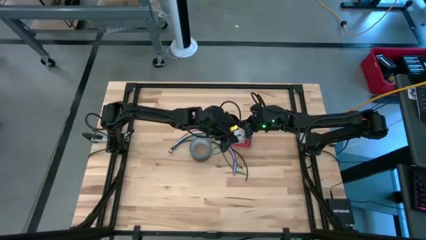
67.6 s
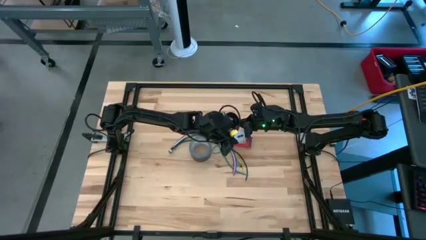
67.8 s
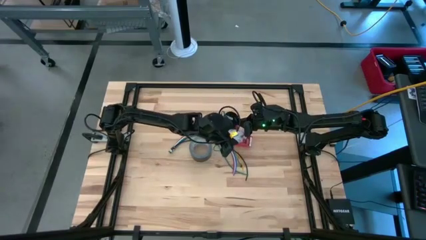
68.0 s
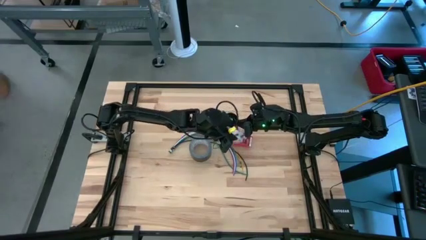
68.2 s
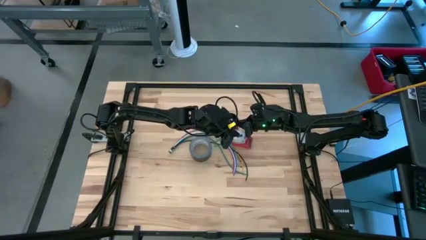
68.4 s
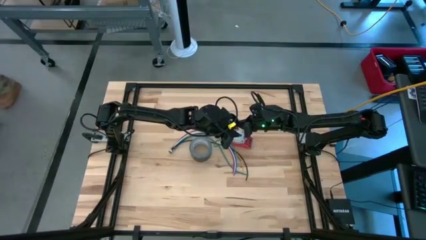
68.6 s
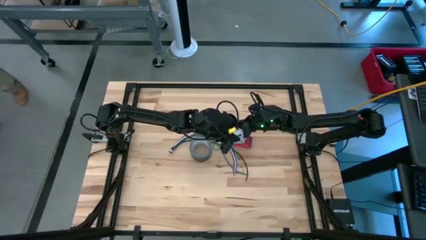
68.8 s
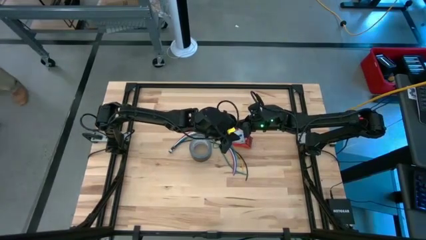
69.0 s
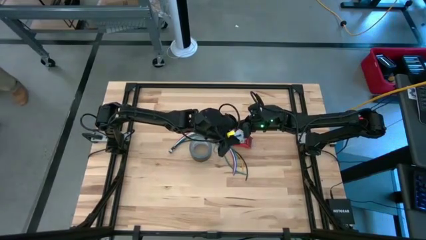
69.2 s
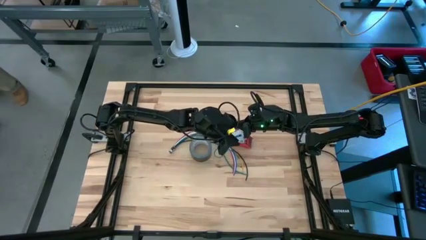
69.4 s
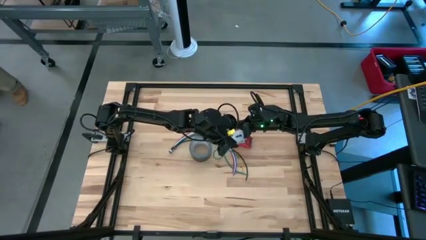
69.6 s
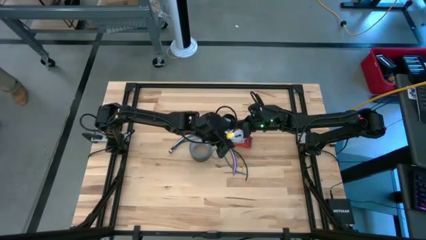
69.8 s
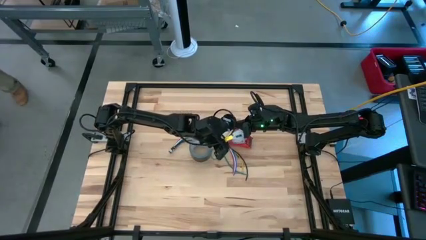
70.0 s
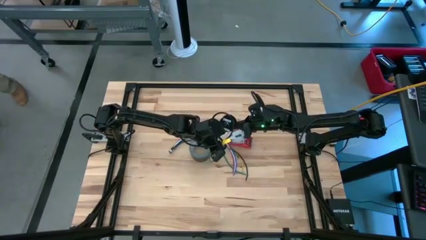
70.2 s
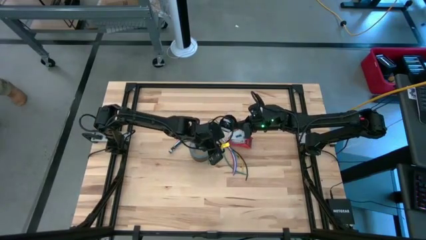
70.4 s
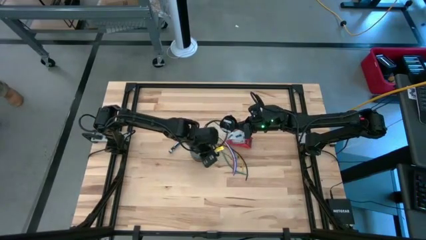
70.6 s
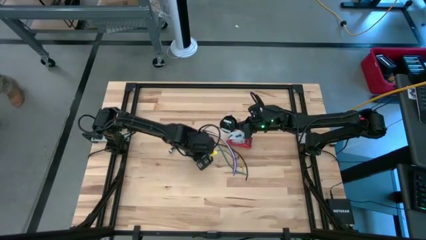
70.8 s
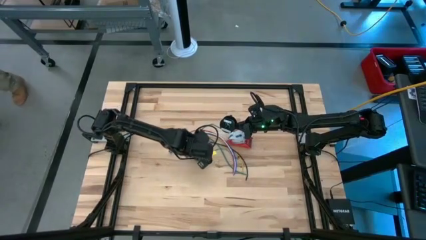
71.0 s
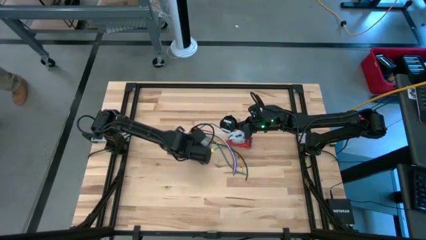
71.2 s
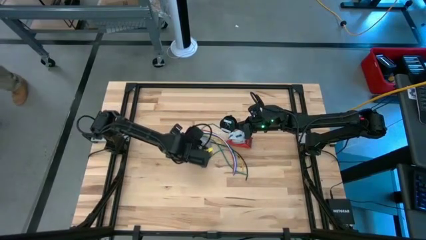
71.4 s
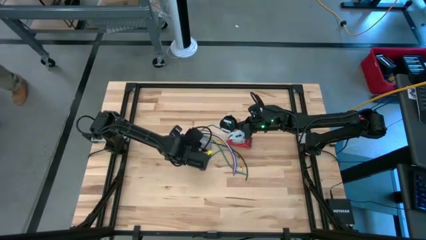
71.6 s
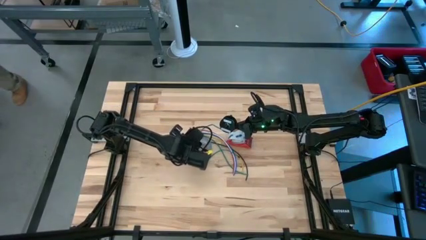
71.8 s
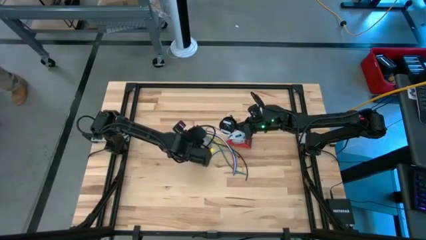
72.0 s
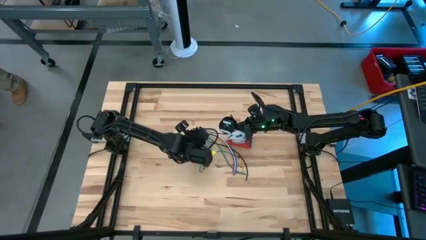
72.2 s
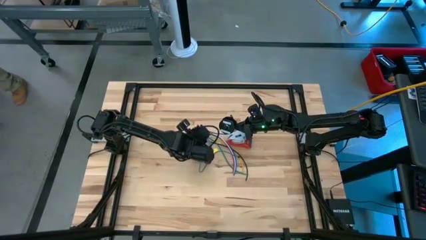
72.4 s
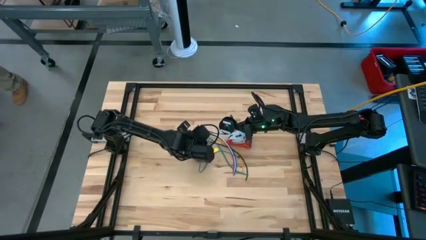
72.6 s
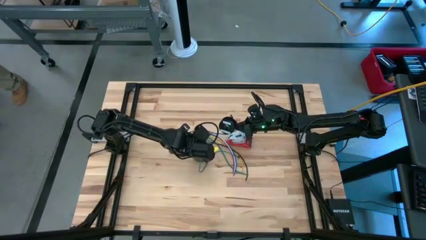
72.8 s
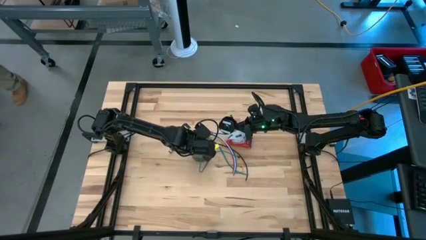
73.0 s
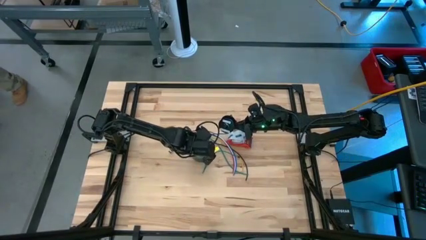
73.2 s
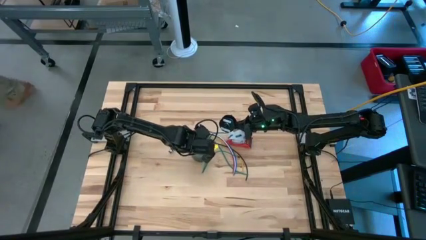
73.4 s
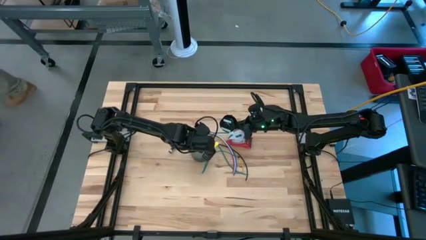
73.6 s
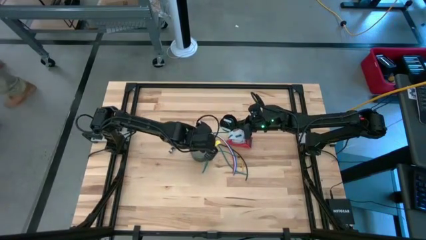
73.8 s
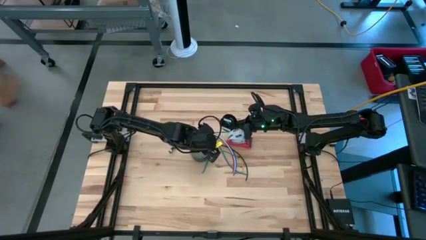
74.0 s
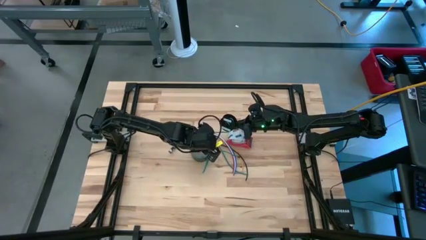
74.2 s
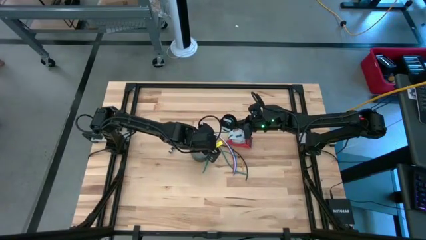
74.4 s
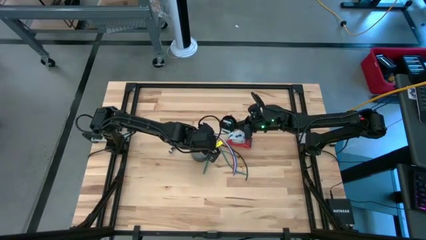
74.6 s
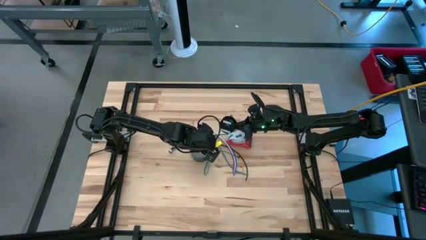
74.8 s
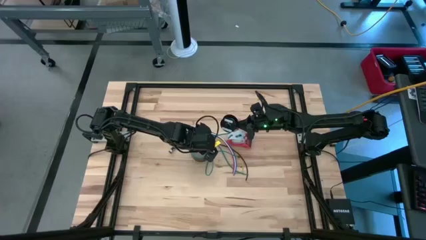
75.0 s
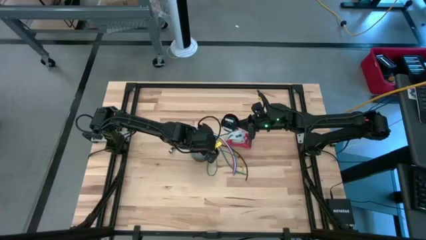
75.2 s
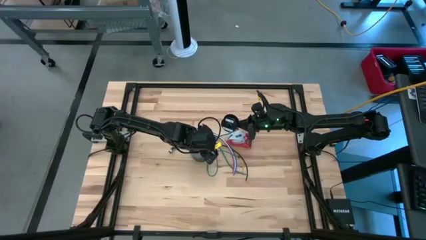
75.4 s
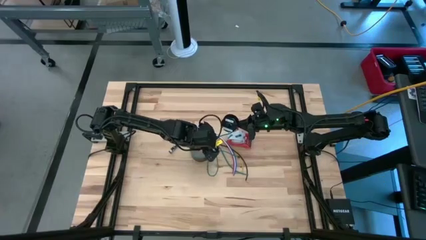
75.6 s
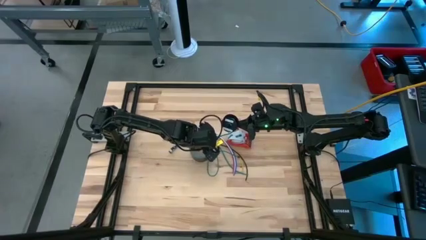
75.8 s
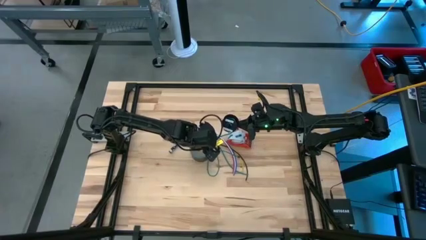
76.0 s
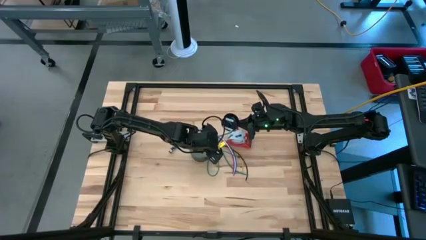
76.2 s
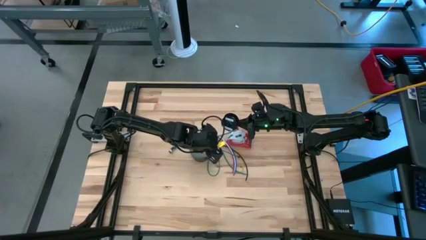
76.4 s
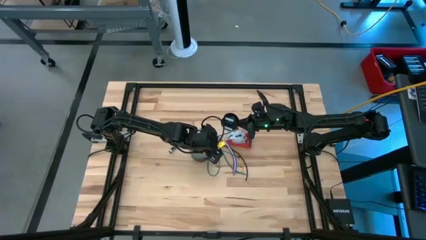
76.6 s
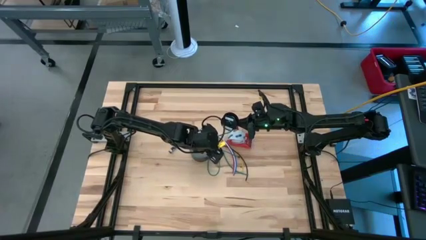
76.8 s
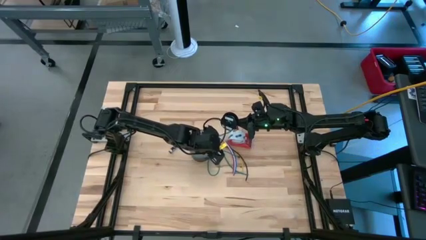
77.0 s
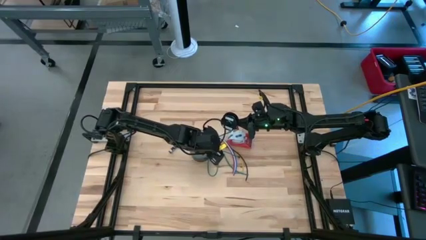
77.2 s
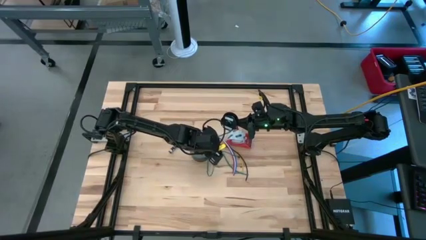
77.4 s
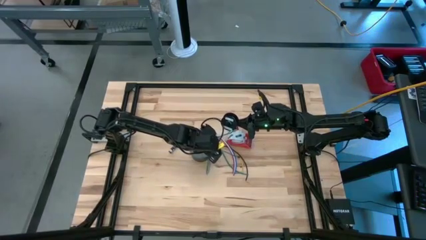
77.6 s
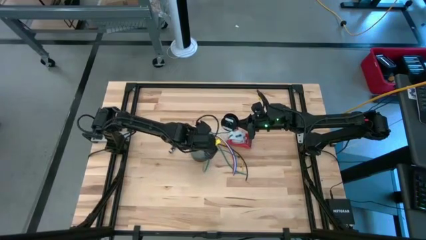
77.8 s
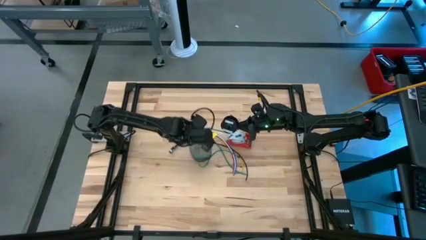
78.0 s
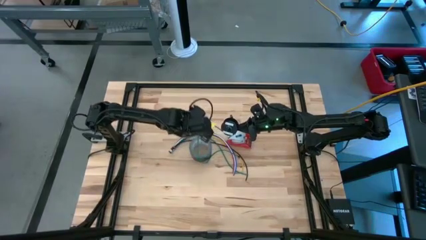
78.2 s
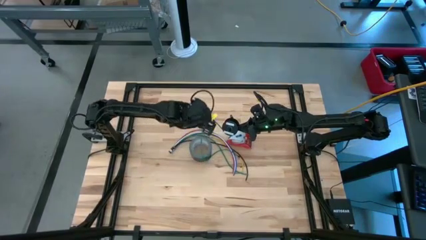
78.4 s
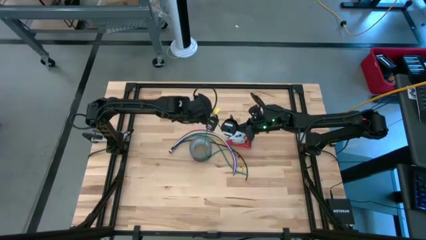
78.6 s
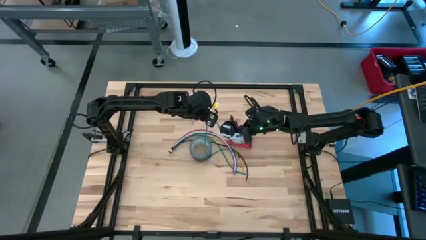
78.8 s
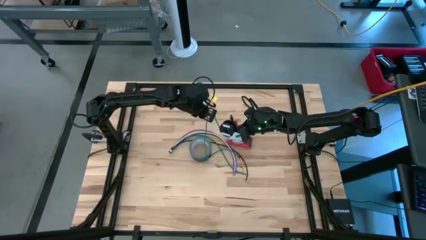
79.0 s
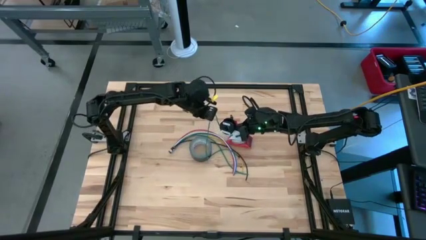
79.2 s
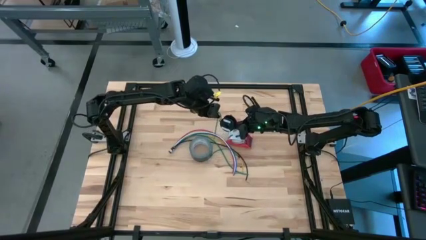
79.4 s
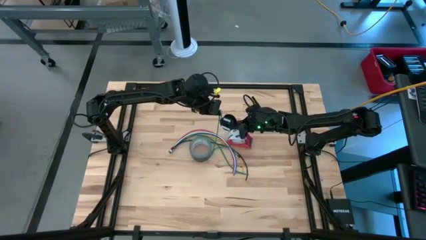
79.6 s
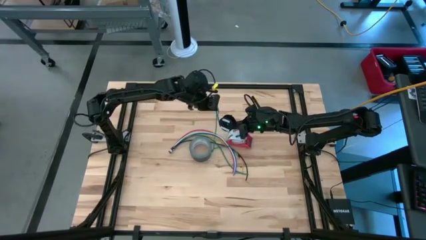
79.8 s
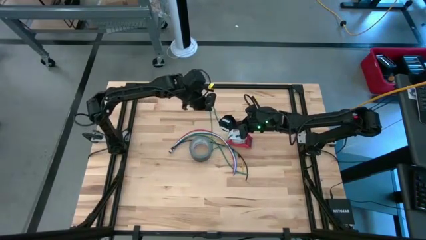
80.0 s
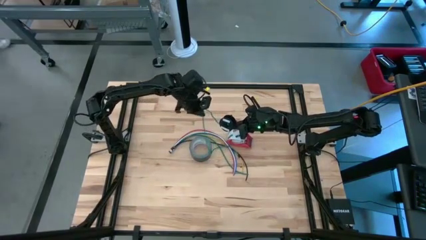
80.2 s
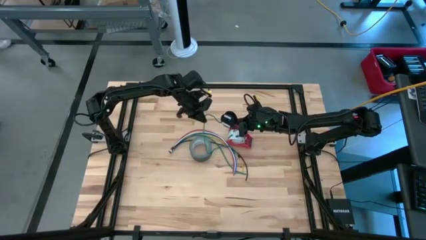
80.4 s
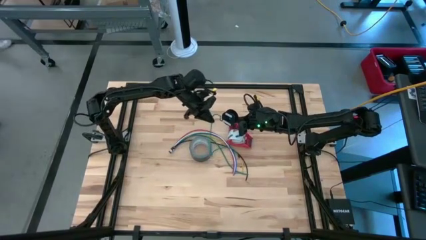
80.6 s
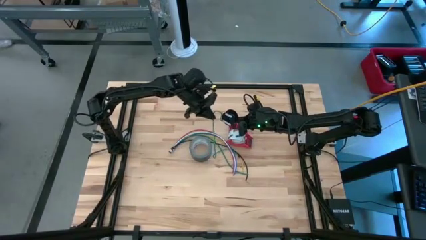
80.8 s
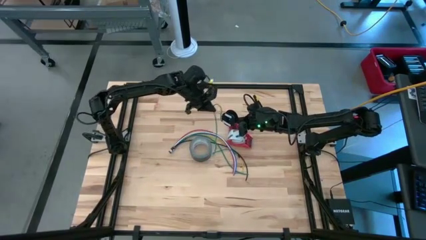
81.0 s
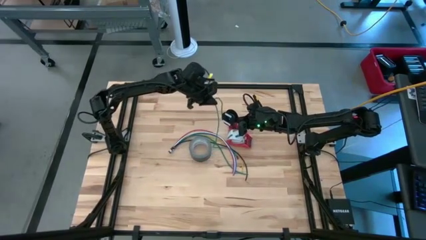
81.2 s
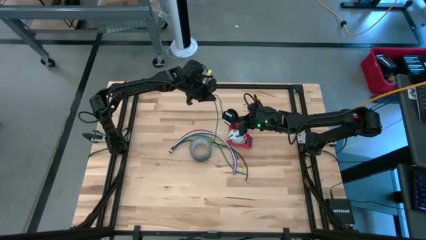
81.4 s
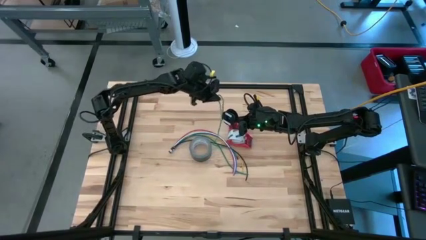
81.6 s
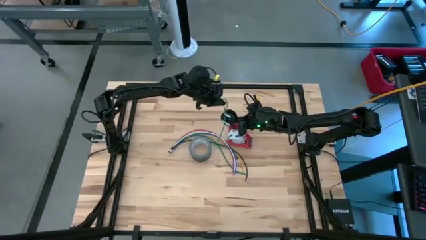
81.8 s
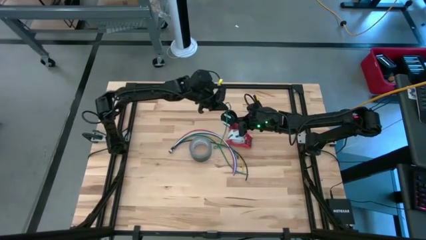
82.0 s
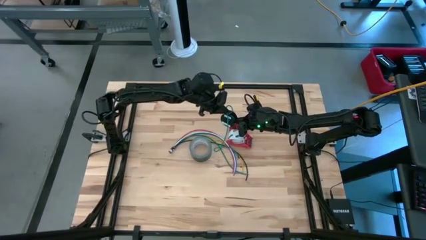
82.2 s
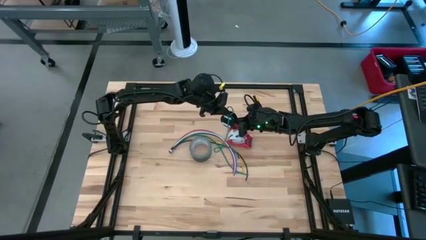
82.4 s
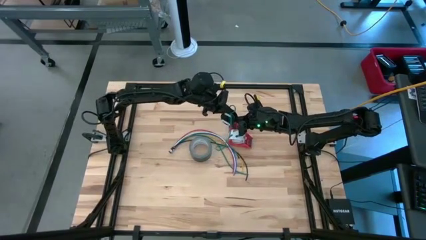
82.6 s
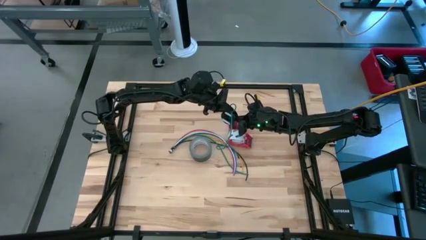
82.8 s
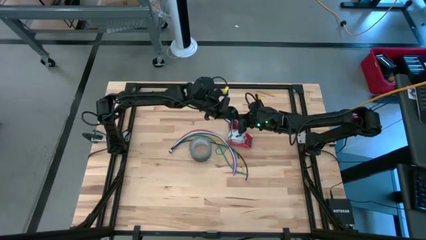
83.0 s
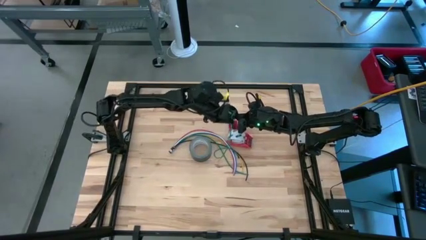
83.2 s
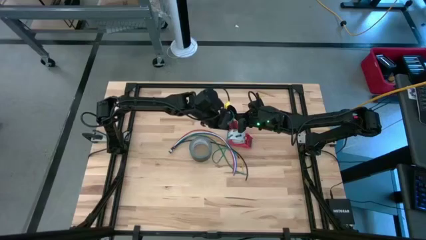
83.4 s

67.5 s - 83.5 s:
Task: Coil cords
Coil the green wire into the spool

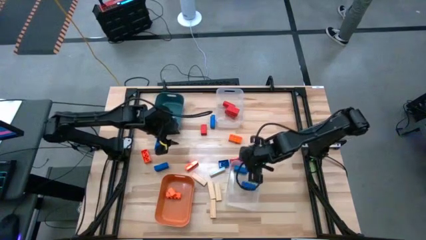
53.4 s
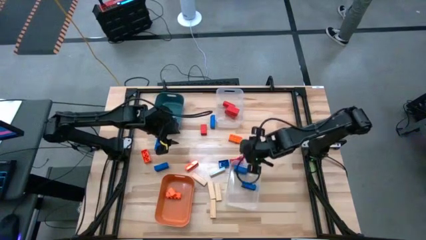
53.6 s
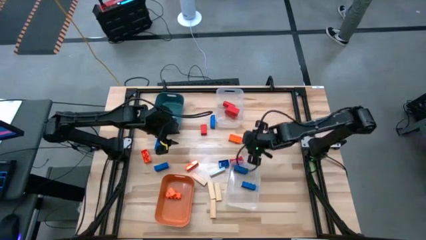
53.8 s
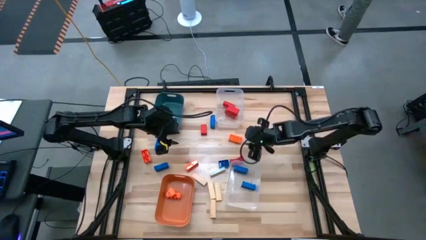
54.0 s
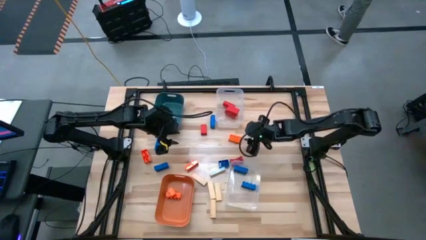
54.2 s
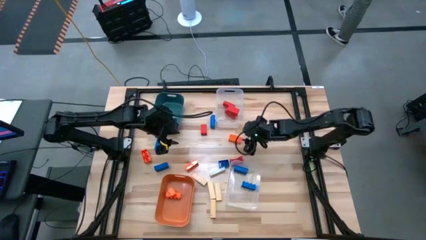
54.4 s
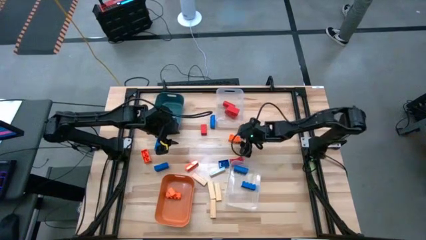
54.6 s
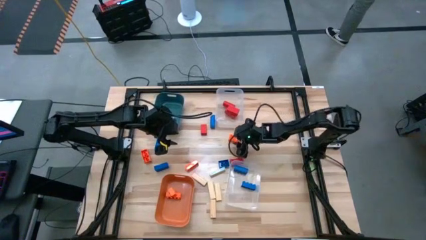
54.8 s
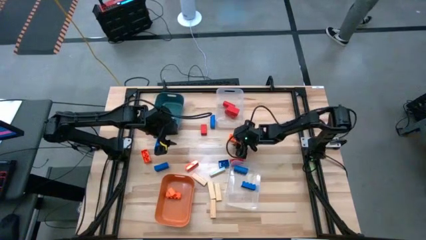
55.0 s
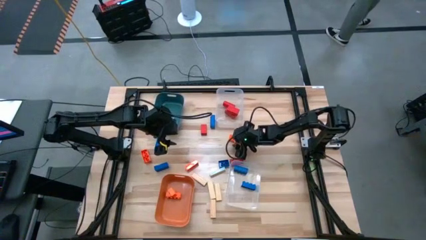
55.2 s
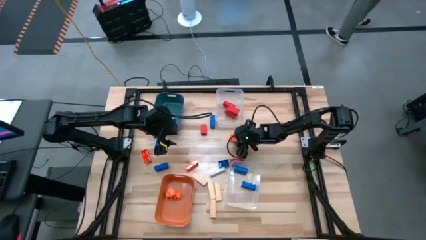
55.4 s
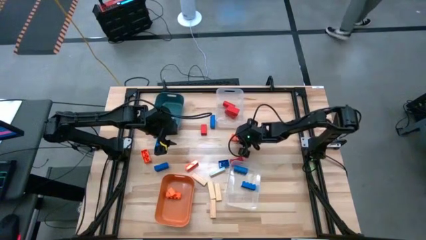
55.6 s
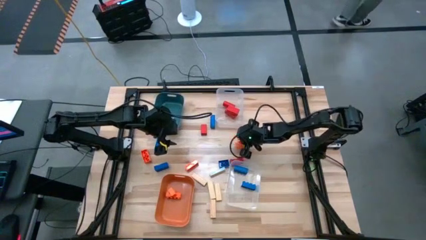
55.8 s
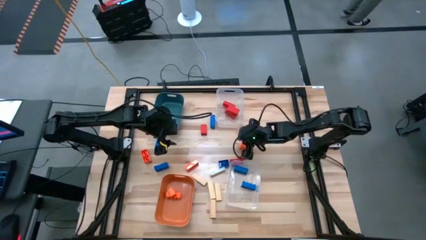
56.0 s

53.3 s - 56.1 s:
Task: Sort blocks
Put the orange game piece into the orange bin
